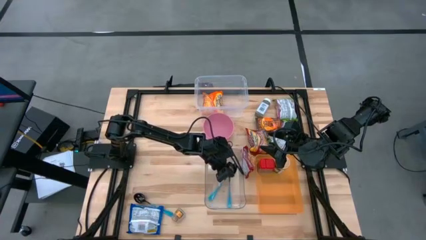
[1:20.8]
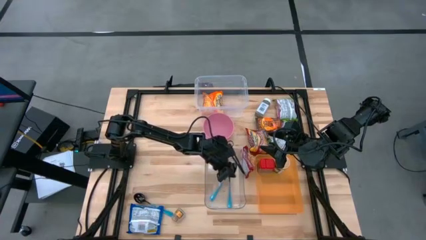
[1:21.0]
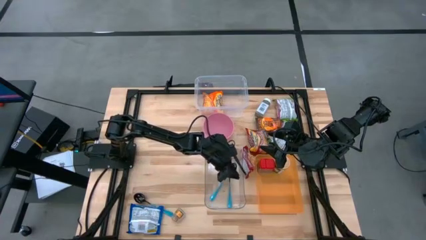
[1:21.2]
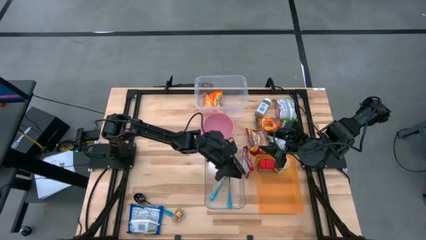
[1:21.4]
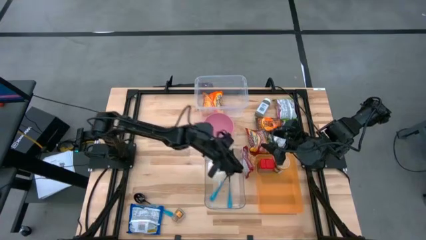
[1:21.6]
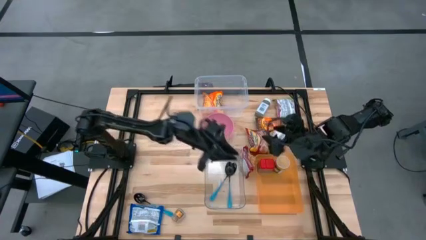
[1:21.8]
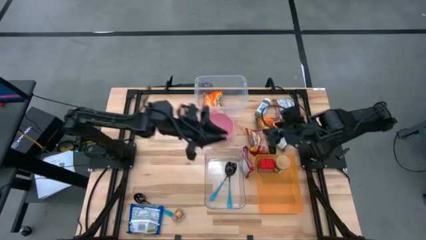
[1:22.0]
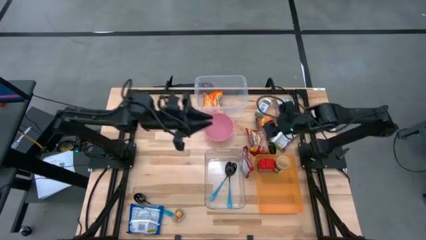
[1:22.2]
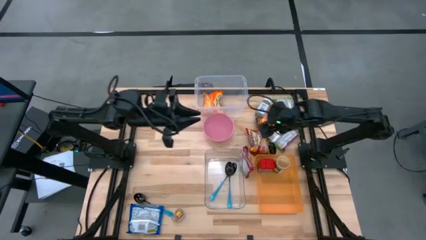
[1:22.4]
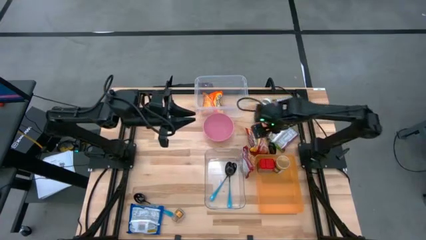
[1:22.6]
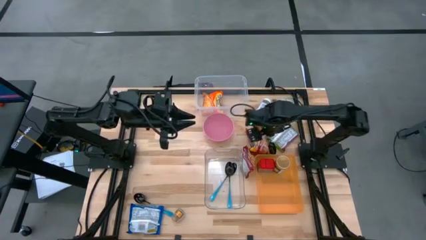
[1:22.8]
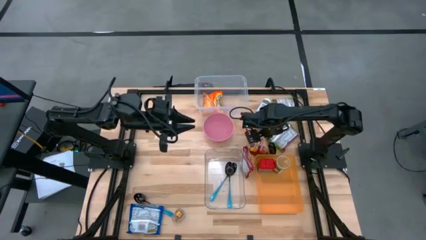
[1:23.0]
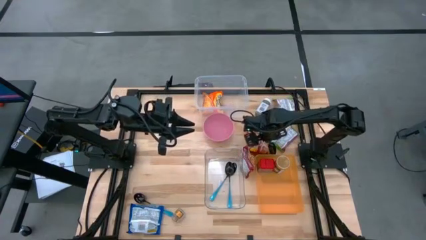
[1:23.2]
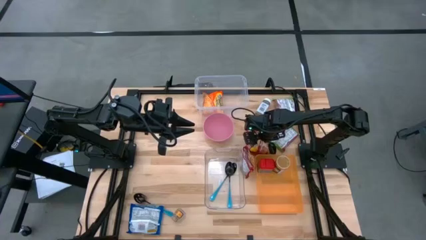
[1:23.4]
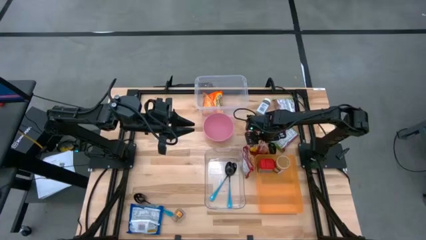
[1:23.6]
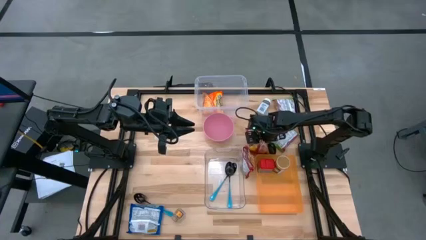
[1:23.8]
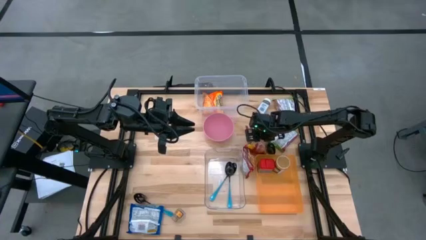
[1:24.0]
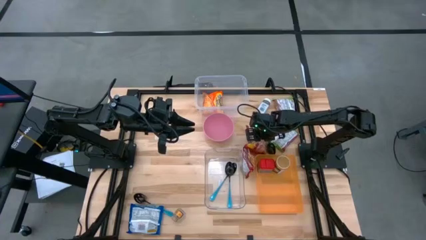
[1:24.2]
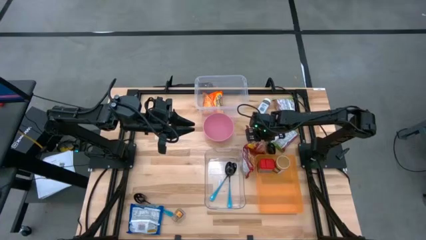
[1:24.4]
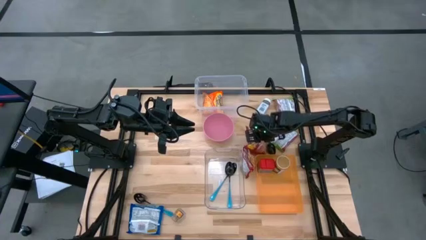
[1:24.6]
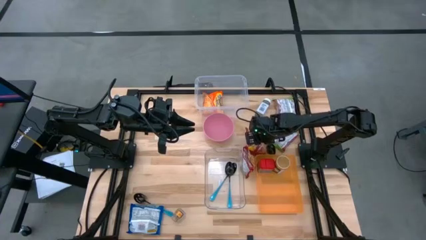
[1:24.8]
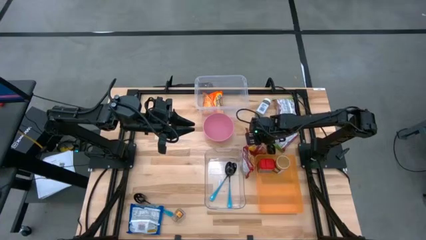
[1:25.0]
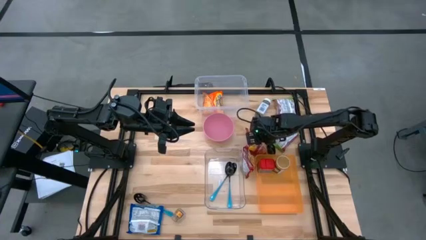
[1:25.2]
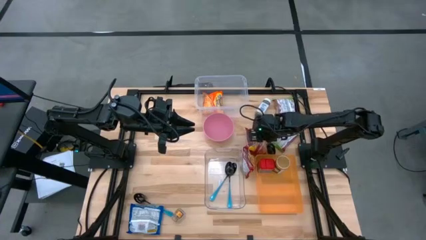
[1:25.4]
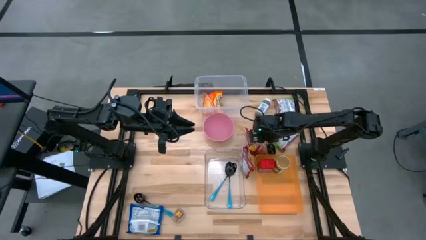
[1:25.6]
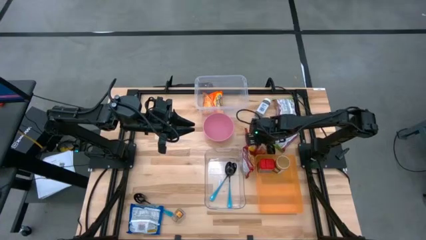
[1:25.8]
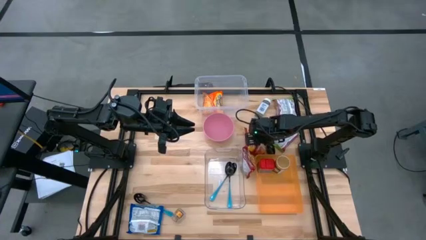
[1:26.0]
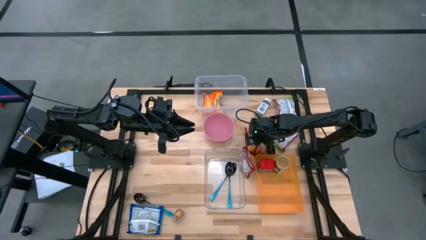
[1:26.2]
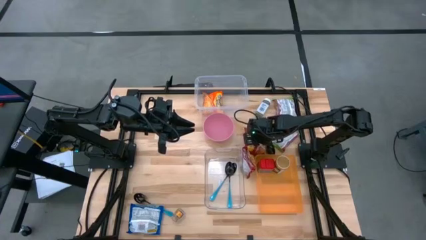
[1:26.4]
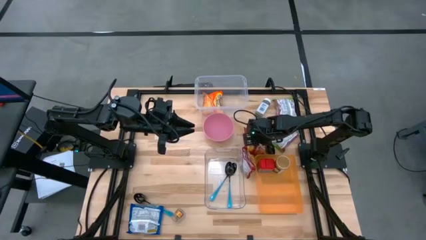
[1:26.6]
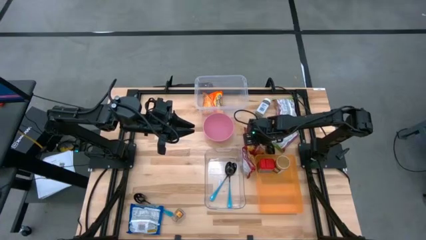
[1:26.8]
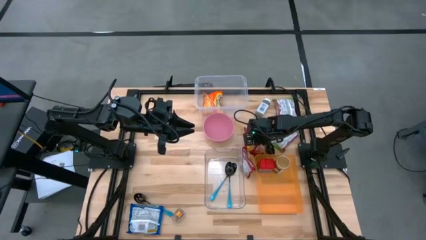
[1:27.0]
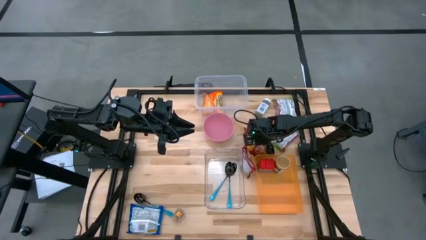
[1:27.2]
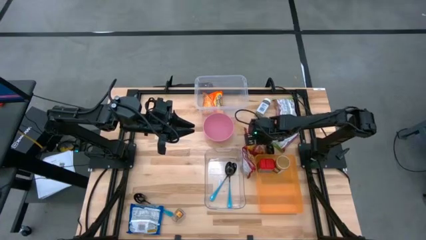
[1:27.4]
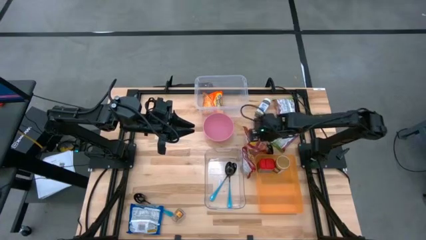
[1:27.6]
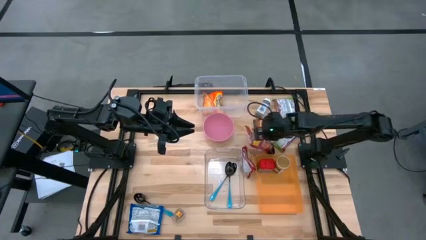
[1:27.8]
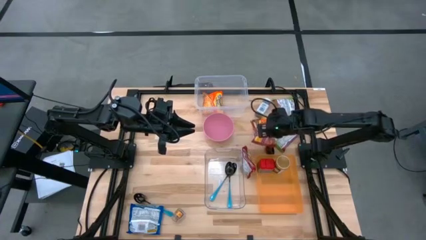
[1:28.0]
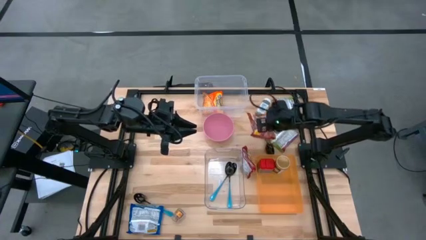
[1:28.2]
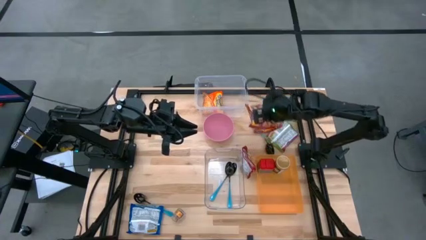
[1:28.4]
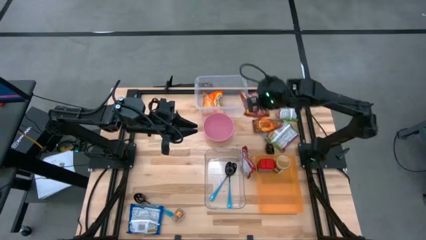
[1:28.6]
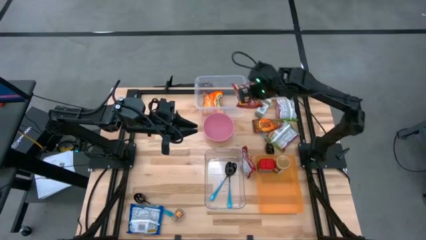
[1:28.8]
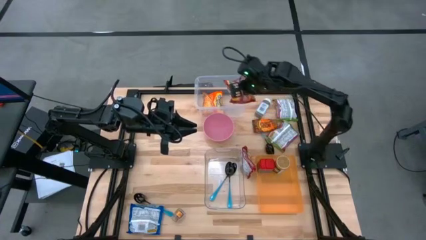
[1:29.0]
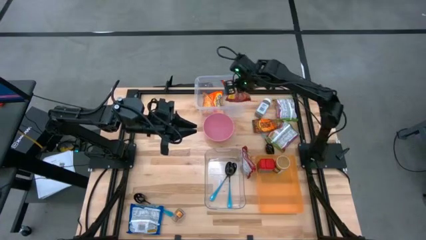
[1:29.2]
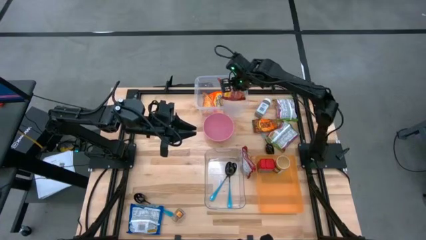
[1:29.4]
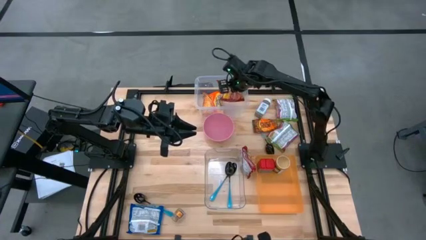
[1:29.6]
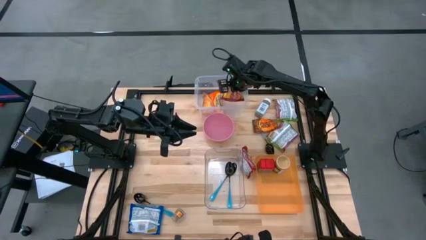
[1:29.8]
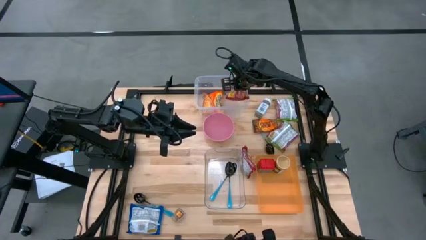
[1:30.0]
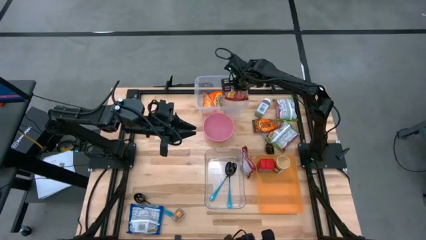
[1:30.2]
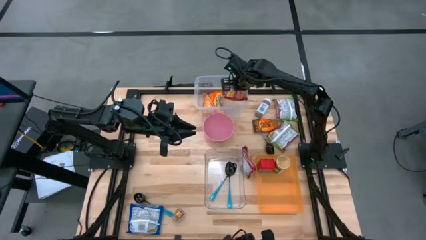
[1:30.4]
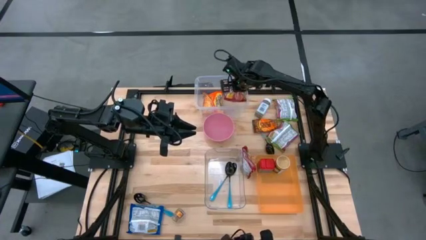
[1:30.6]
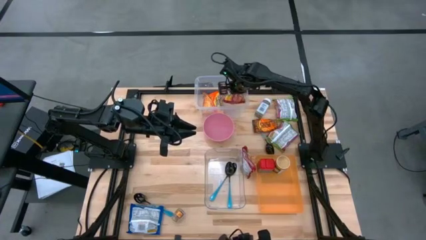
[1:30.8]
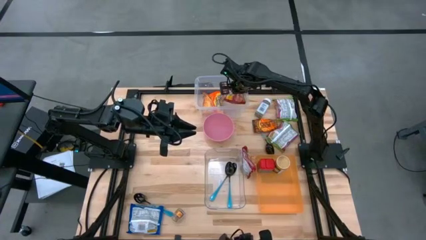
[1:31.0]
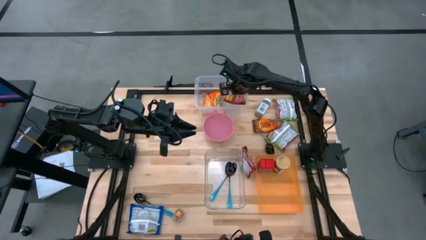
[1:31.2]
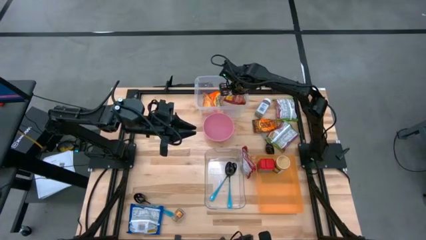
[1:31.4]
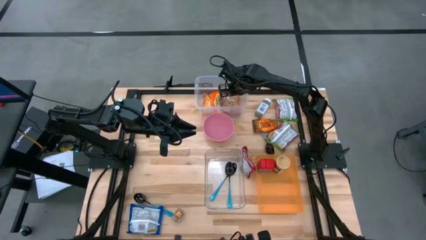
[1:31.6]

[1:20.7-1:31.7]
Task: Pick & Place Food Item
Put the red noodle pack into the top transparent bin

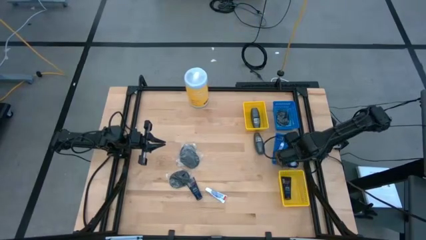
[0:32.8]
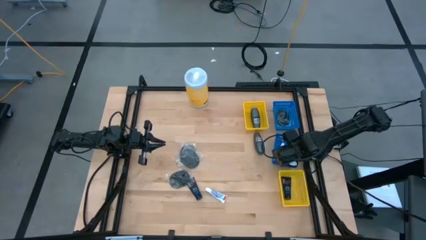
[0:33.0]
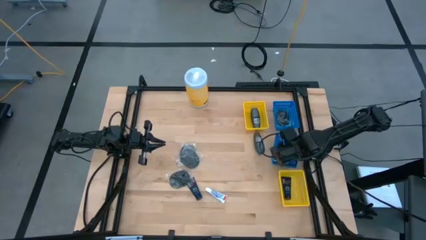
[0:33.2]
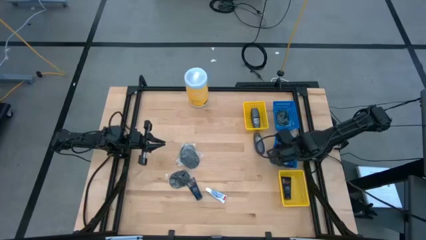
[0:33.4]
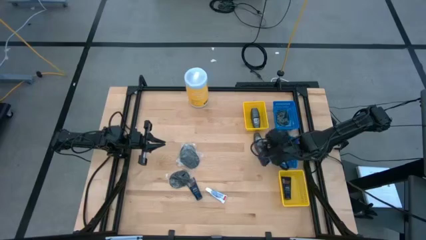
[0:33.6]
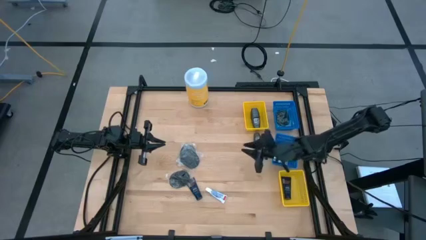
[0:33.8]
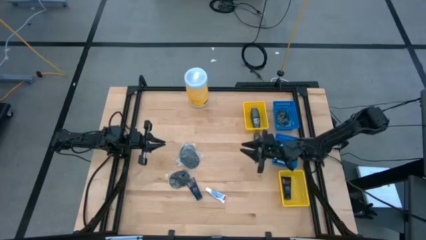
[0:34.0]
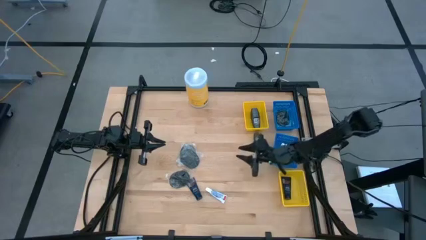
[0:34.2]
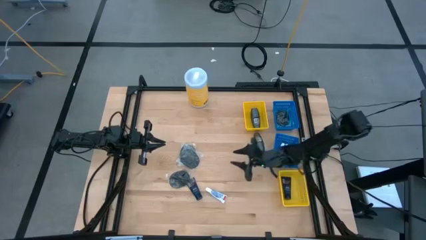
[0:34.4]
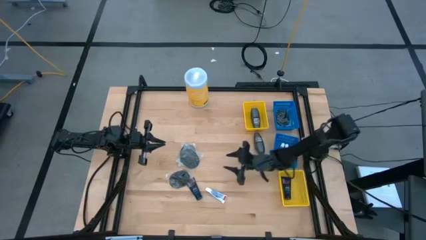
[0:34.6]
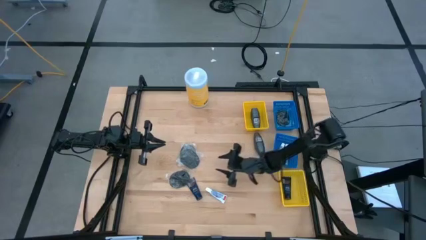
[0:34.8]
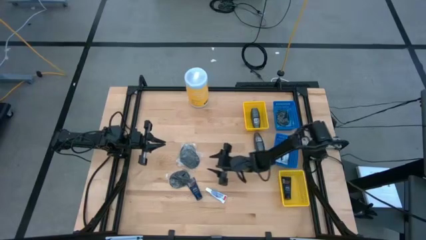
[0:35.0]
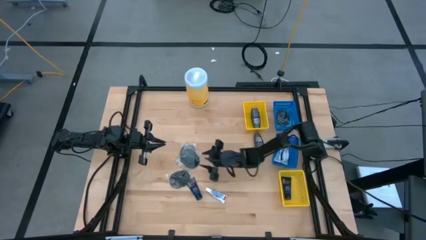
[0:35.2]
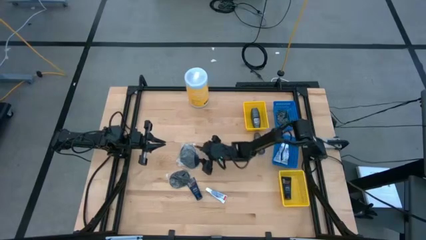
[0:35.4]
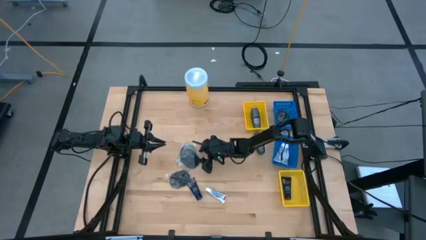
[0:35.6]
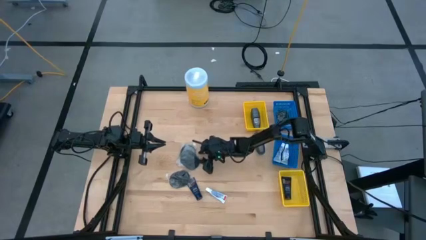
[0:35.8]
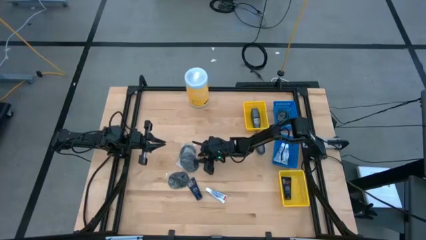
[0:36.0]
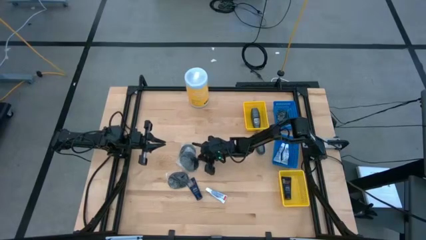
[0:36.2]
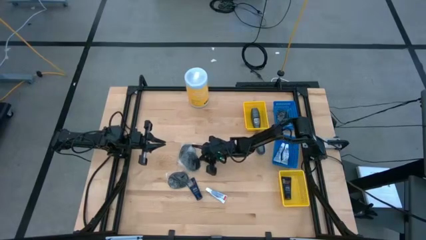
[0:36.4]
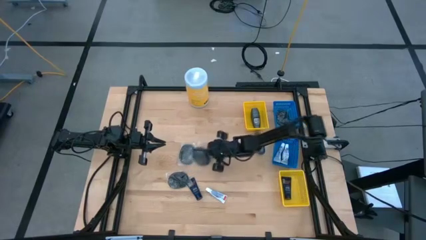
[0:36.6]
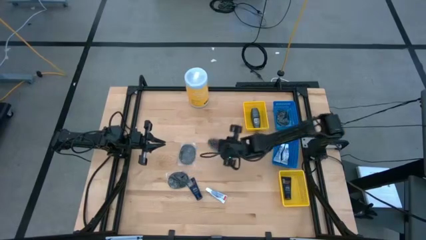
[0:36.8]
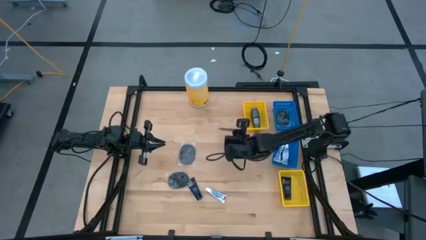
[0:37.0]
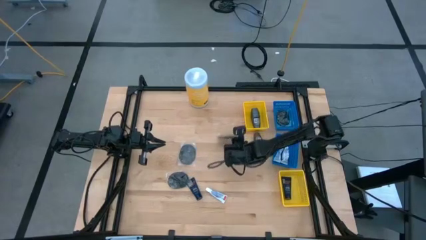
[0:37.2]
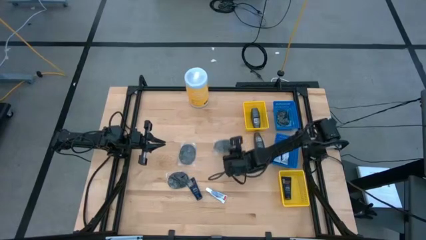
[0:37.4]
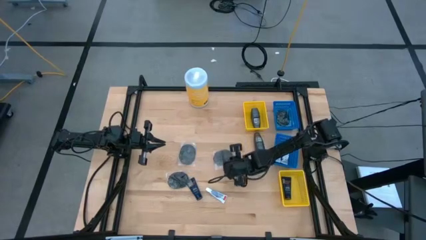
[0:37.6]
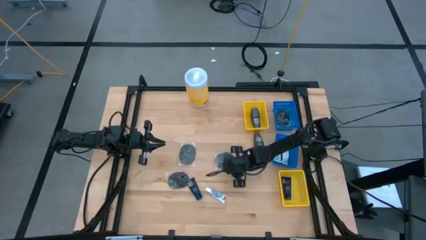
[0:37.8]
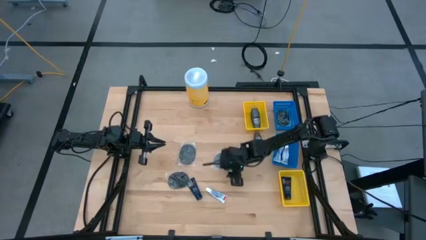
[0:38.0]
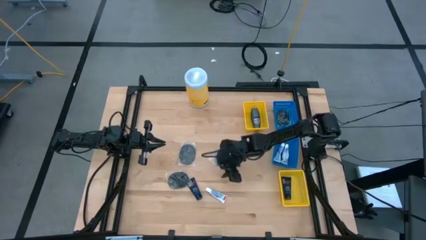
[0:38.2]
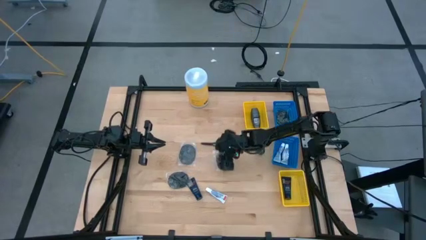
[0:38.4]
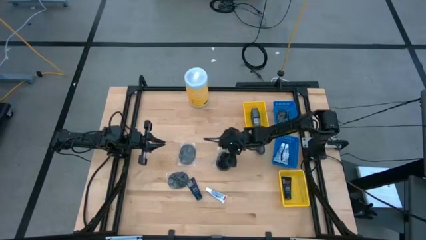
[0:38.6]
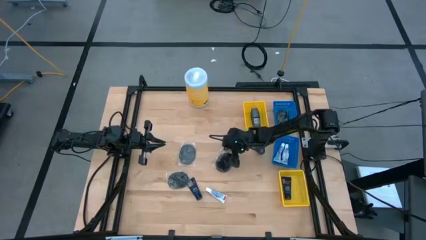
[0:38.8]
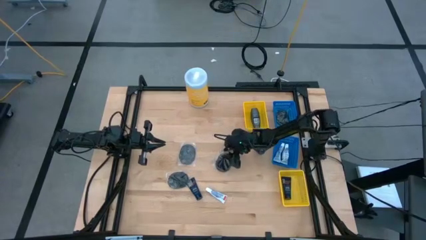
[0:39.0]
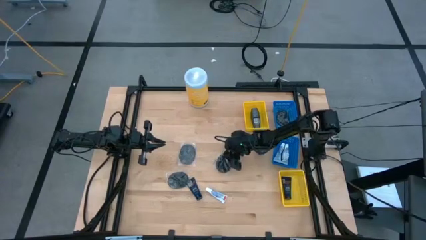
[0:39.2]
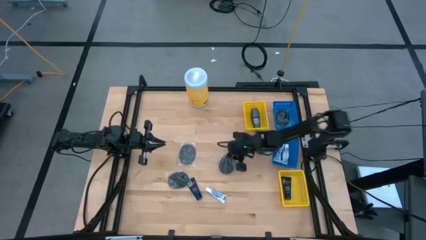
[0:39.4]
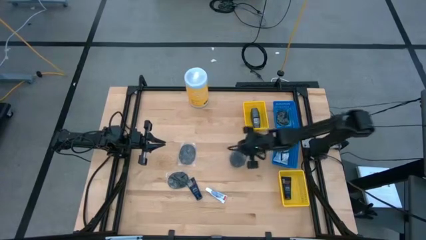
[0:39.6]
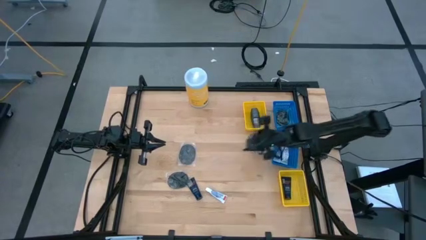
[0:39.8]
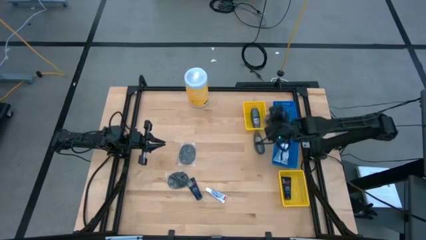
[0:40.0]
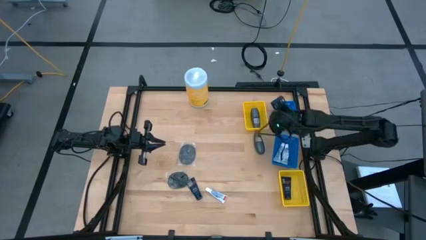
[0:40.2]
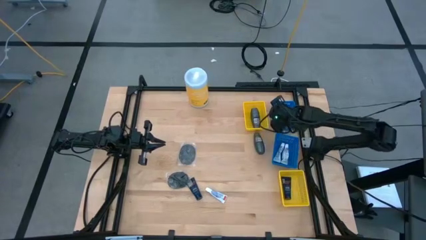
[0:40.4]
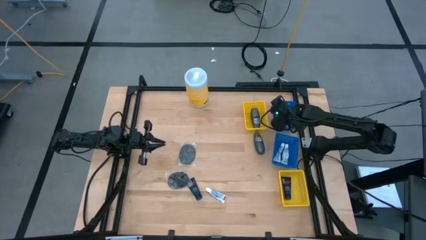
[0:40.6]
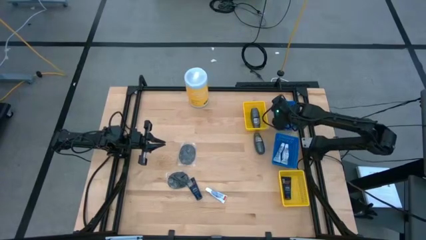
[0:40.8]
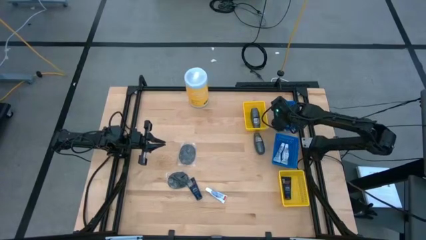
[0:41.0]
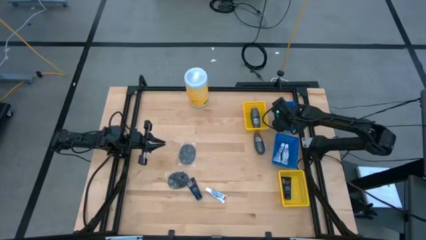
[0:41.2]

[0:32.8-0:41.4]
Task: Pick & Place Travel size toiletries
Put the top black hairbrush into the top blue basket
